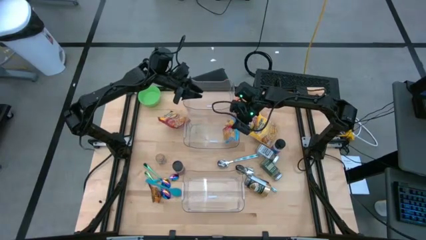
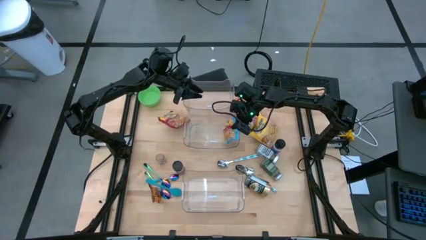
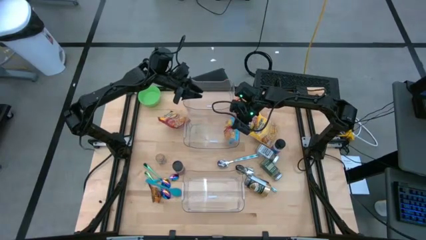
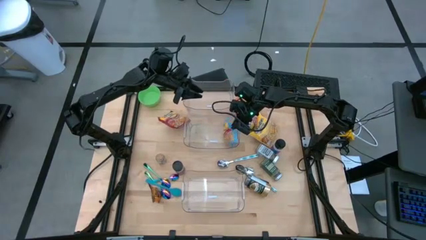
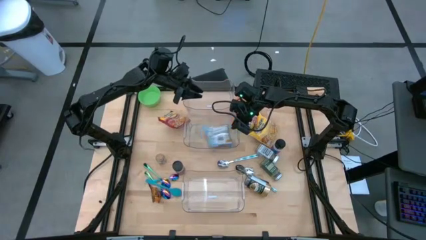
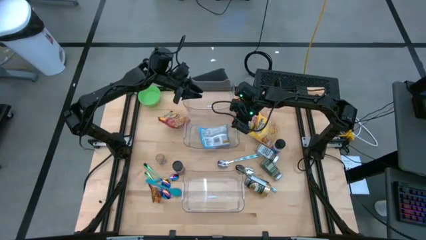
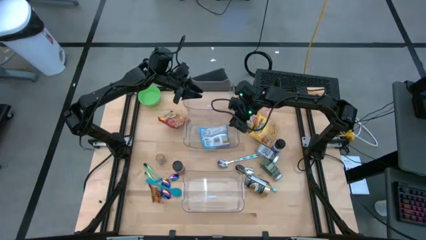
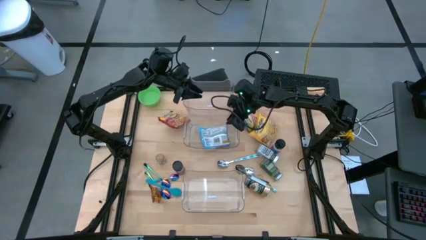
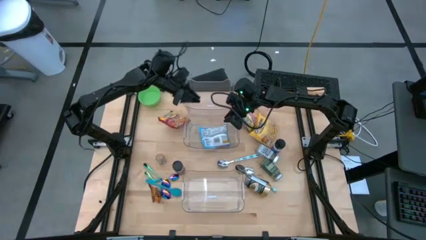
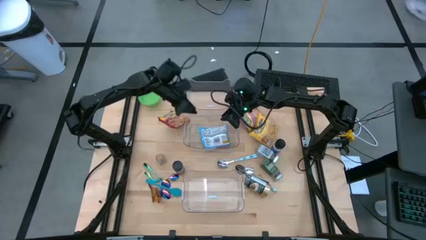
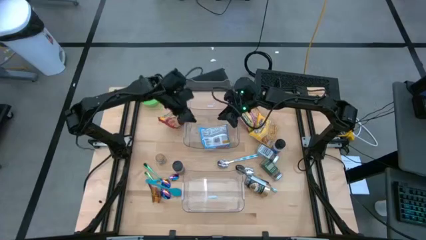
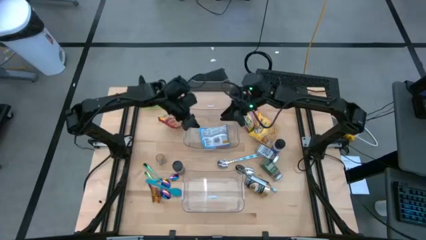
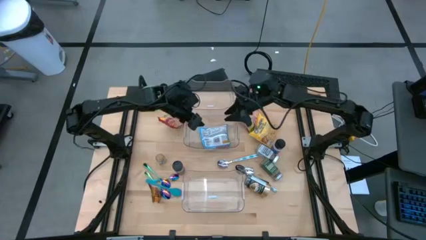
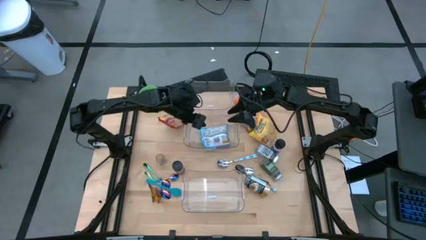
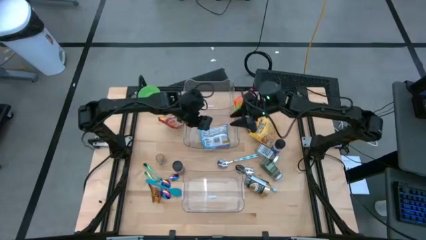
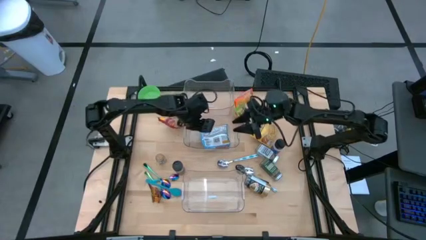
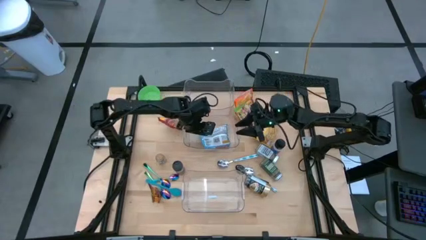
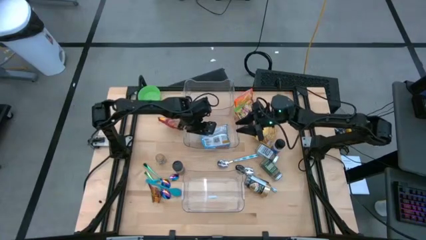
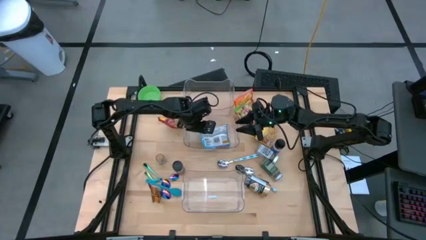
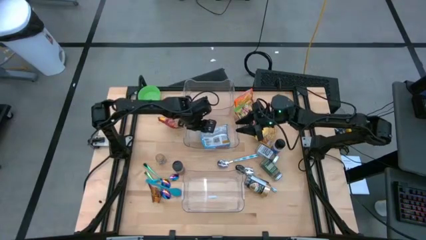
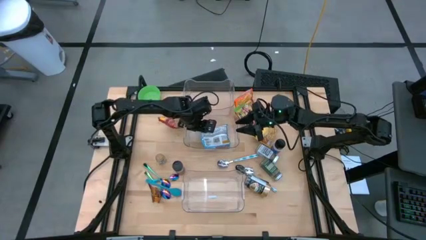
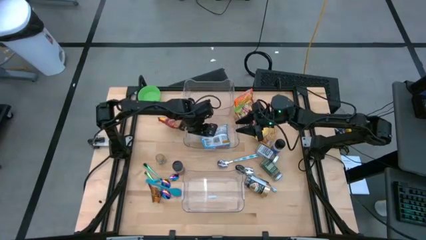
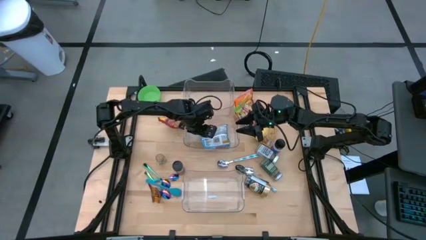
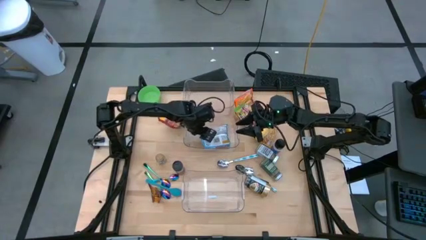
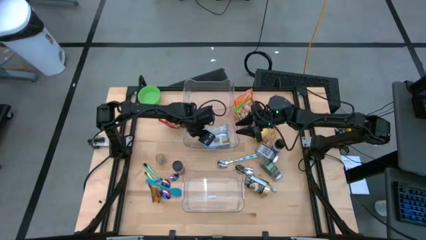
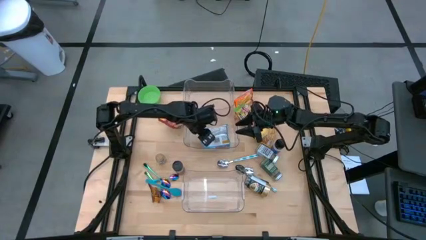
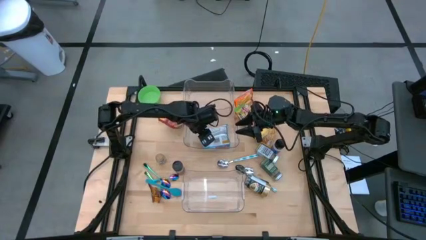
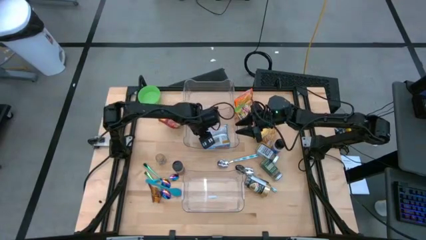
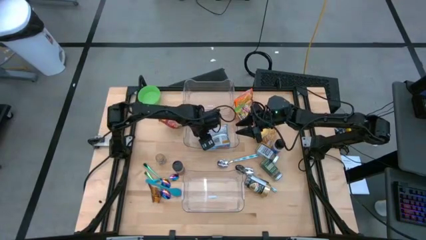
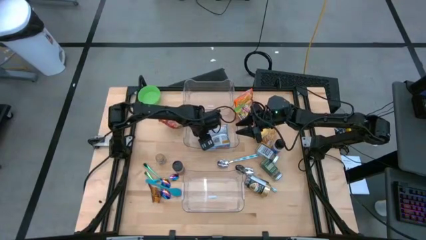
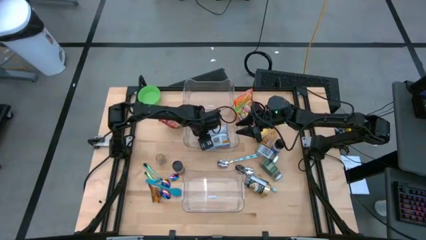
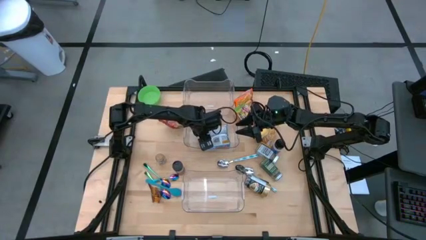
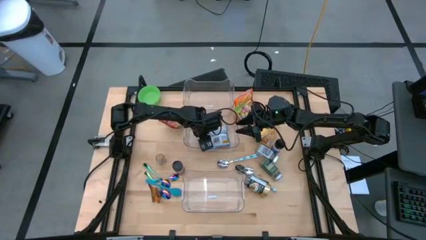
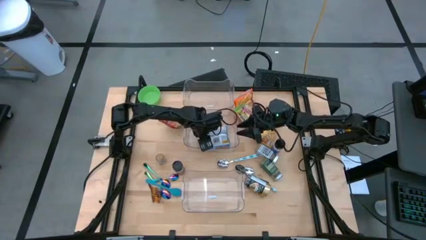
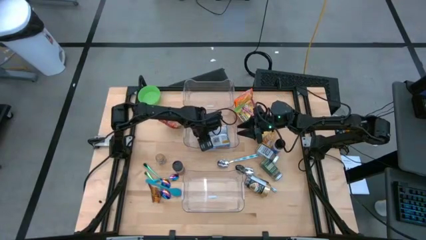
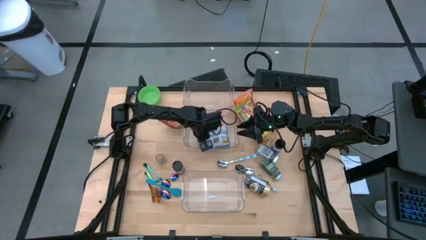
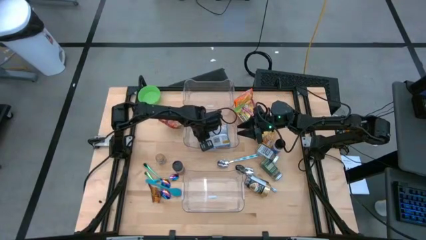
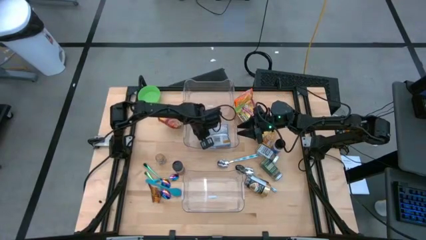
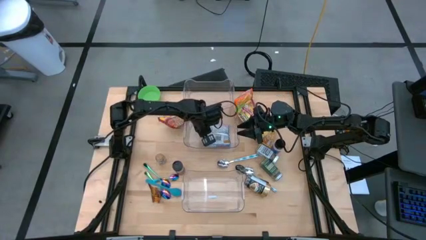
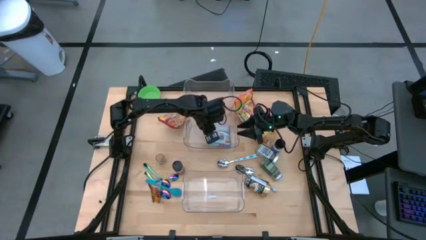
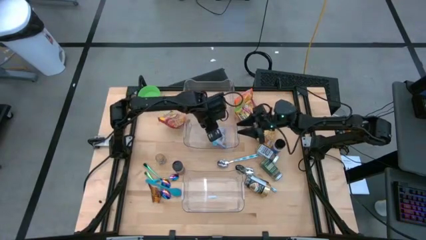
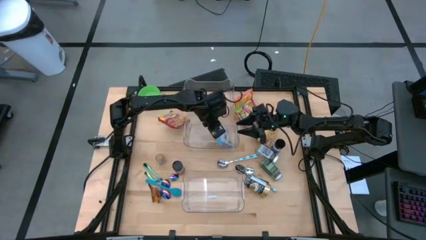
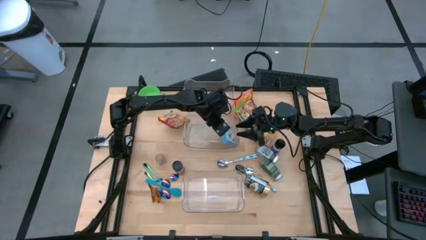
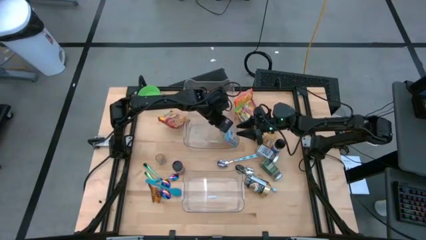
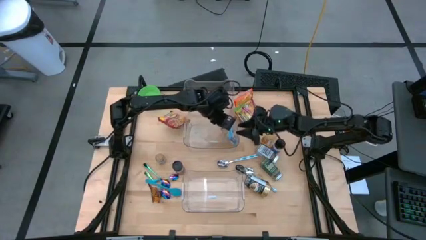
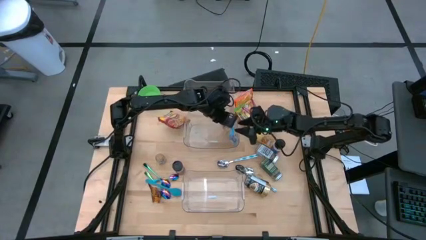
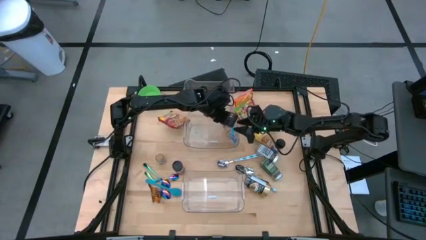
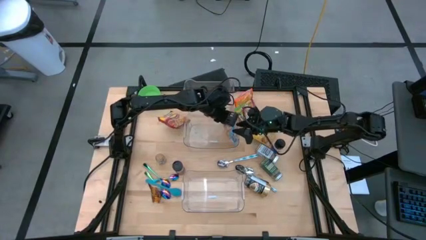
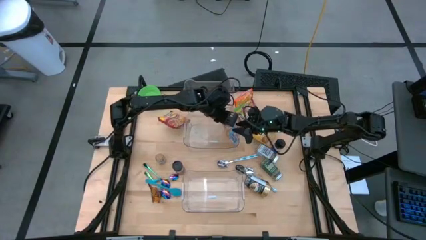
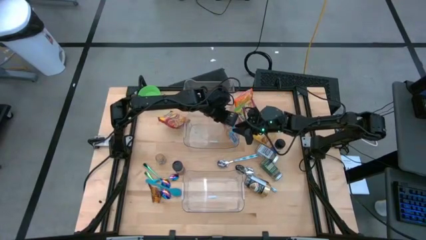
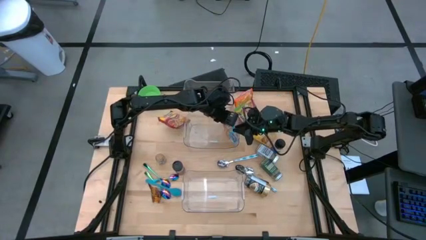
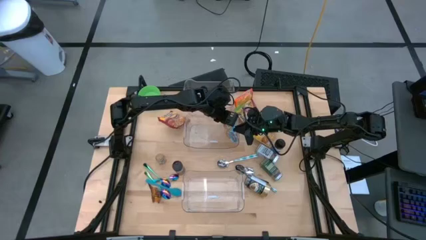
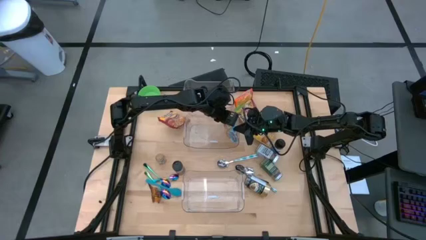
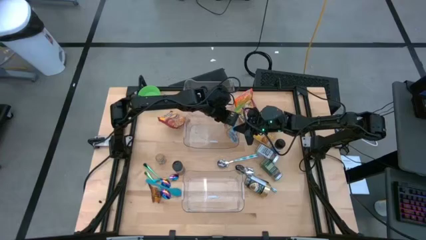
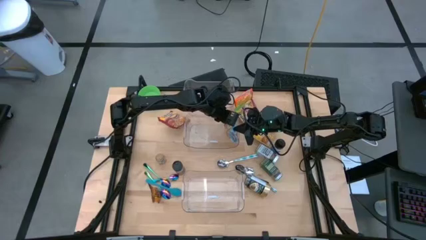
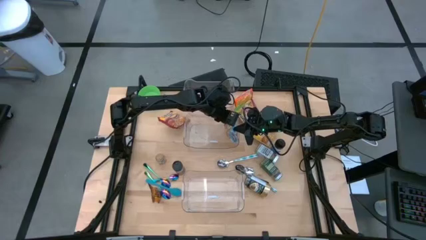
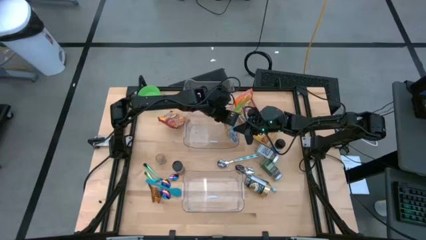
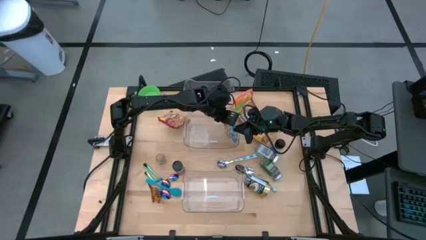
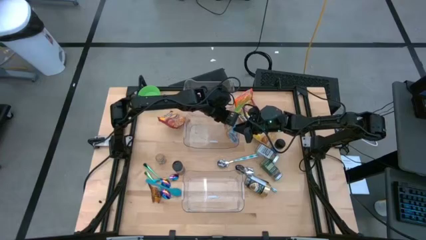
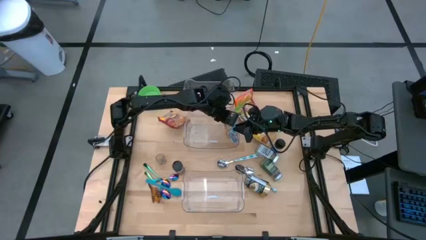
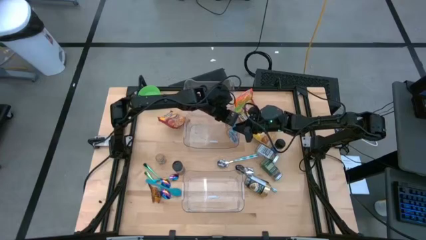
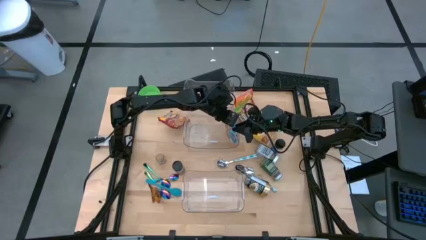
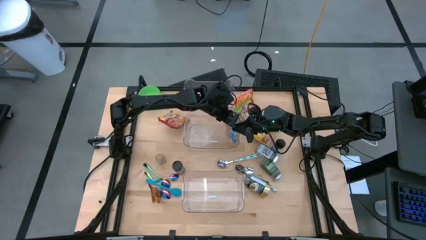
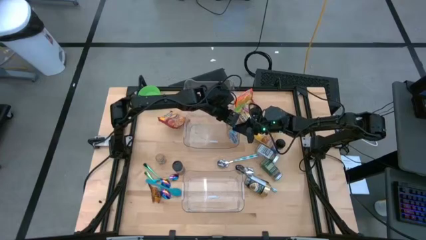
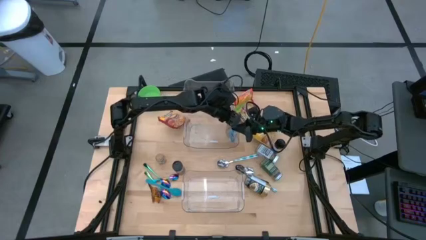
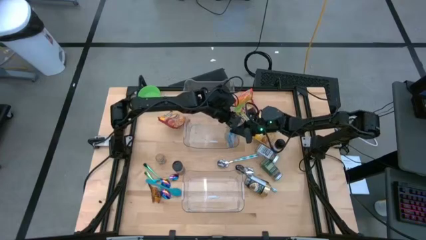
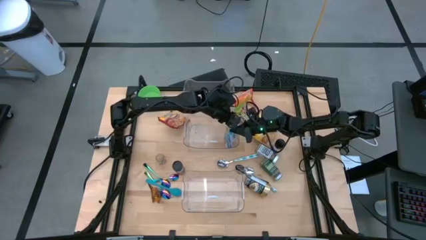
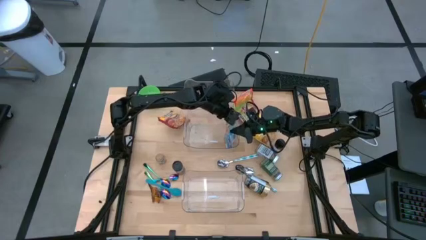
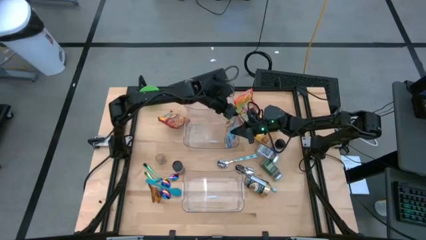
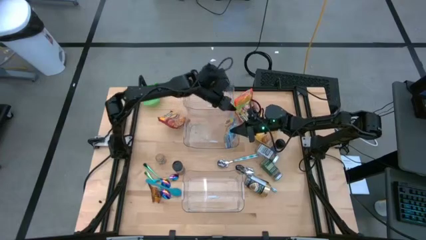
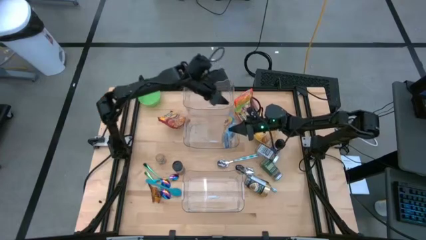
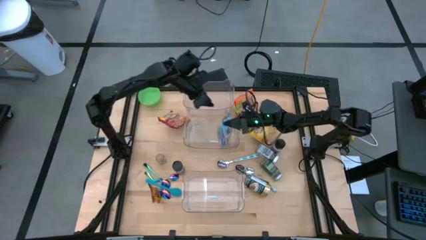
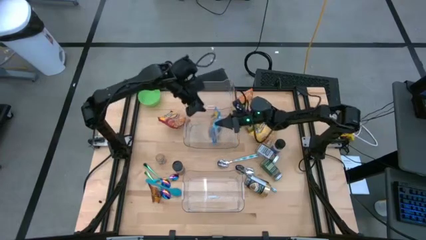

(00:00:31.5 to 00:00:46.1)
Task: Pick & Place Food Item
Put the blue noodle pack into the middle transparent bin

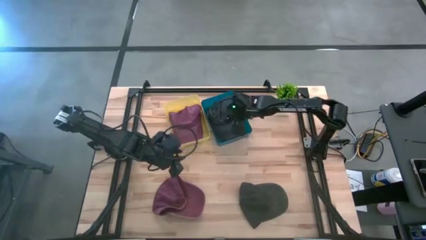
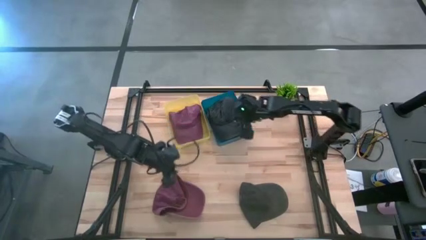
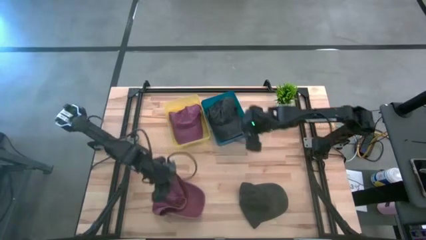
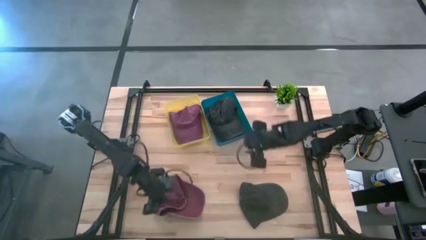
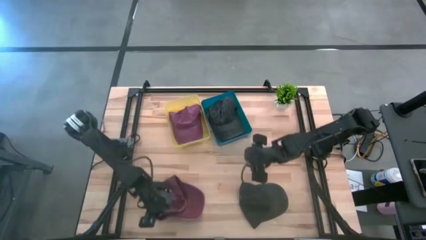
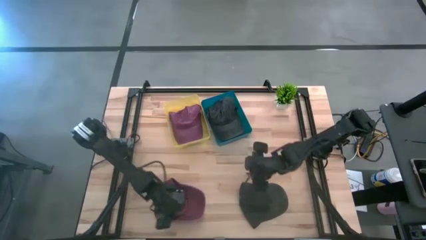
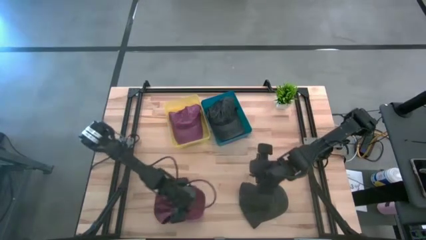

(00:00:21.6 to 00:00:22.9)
Task: Pick & Place hat
Put the red cap into the yellow bin
